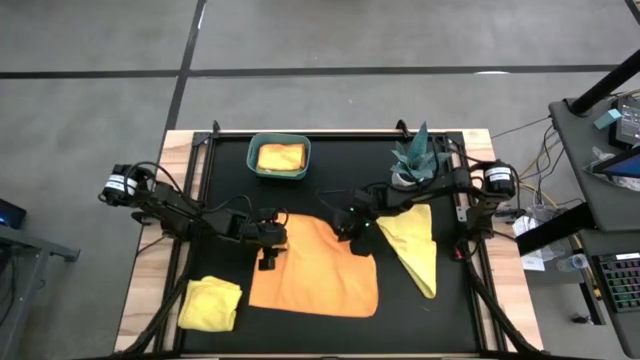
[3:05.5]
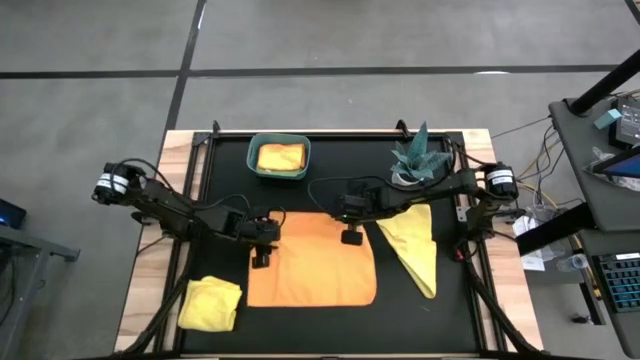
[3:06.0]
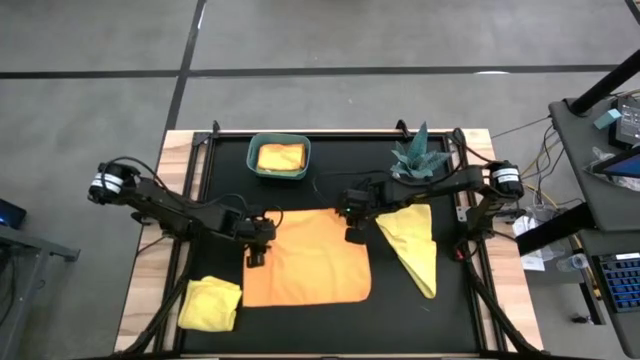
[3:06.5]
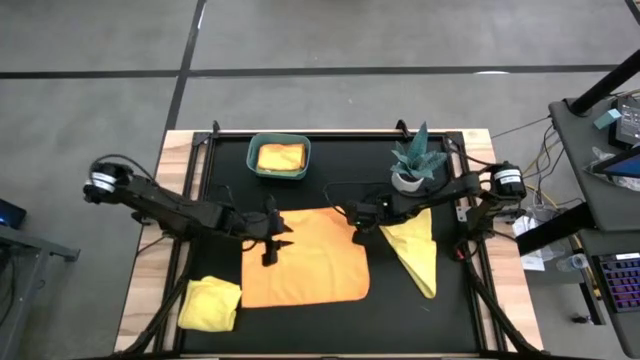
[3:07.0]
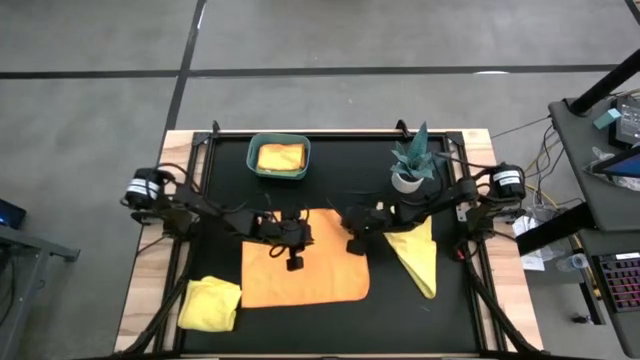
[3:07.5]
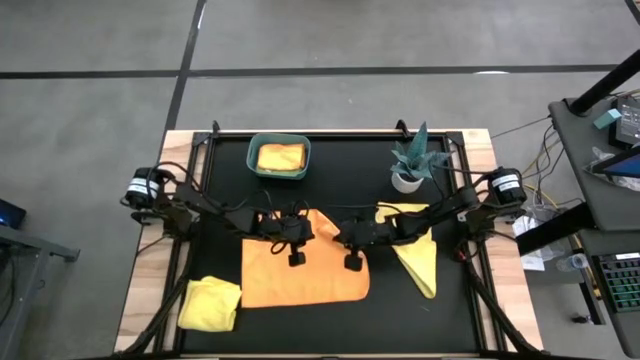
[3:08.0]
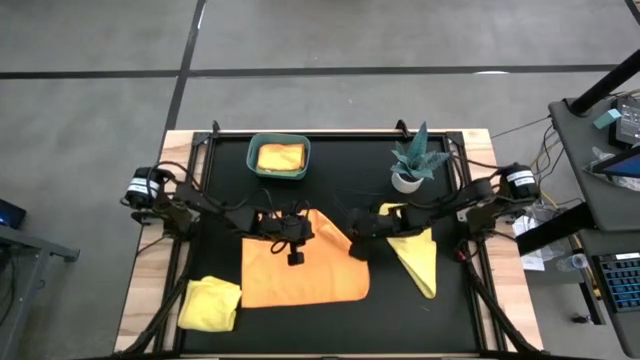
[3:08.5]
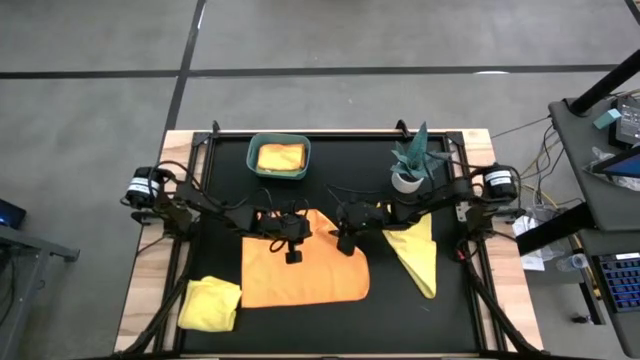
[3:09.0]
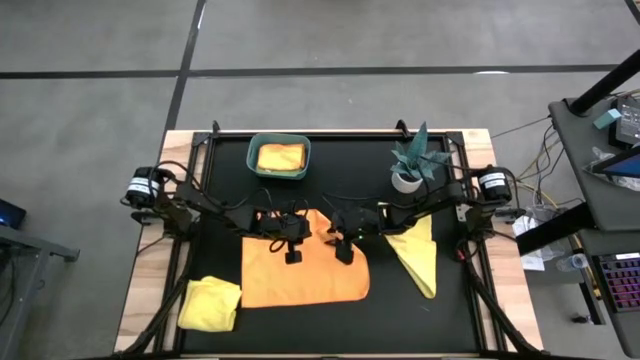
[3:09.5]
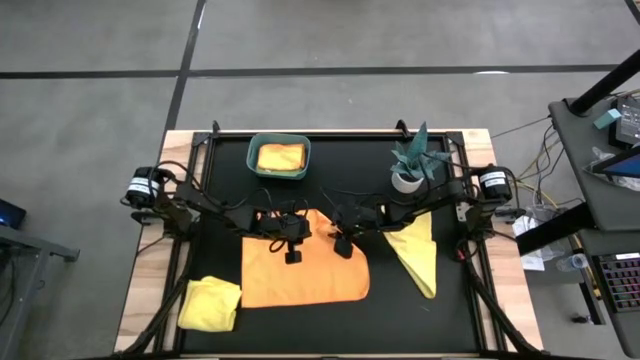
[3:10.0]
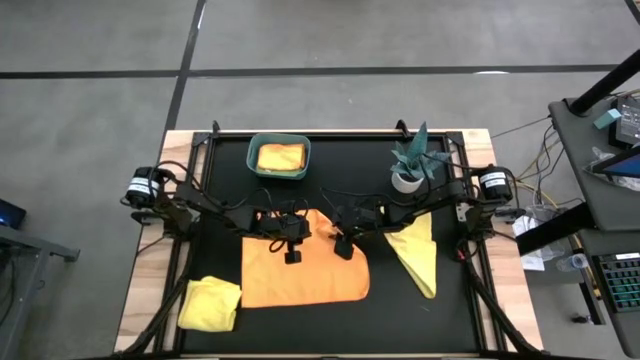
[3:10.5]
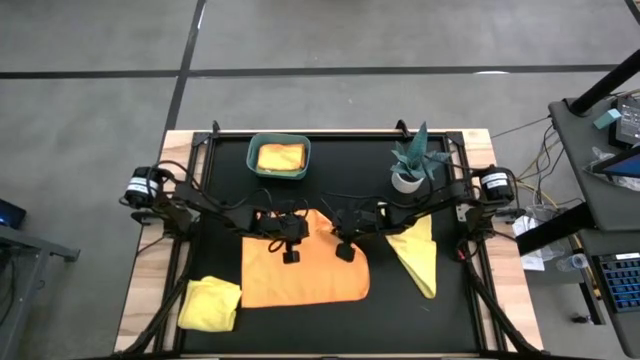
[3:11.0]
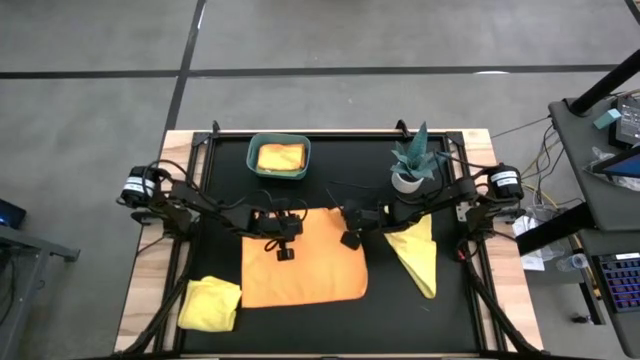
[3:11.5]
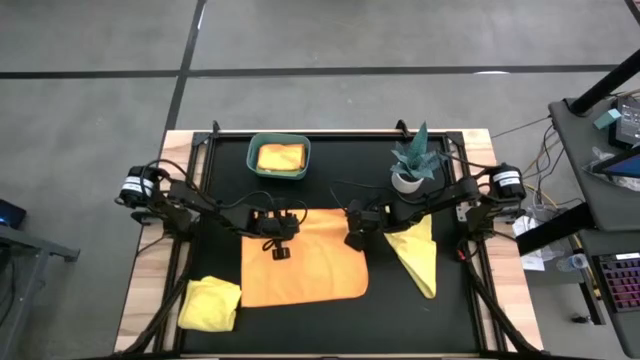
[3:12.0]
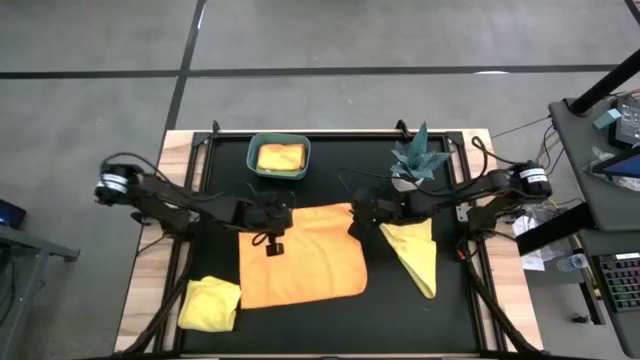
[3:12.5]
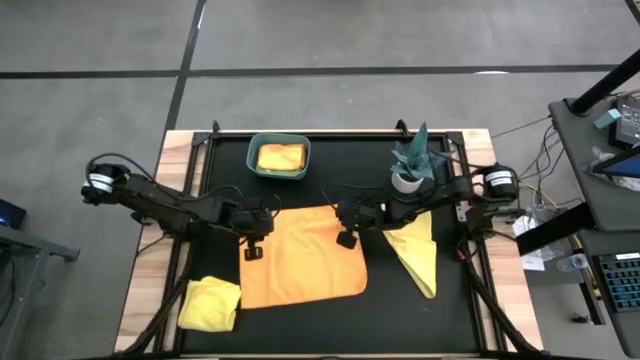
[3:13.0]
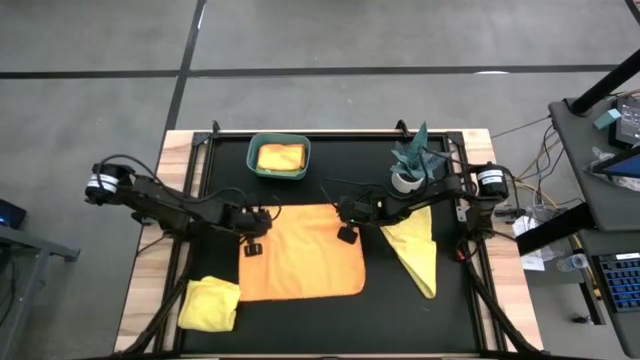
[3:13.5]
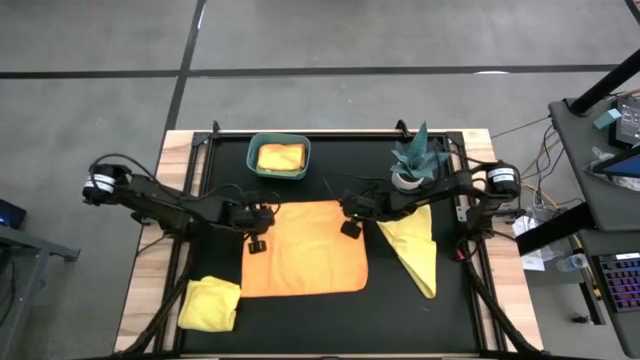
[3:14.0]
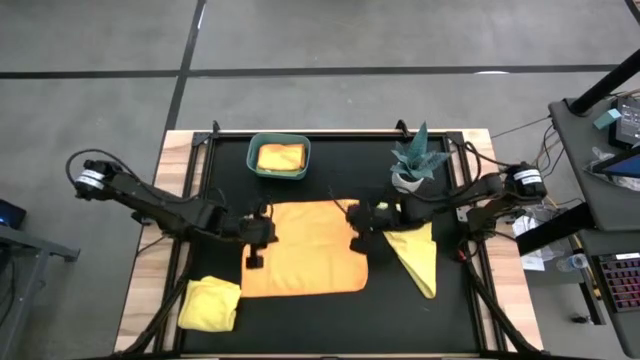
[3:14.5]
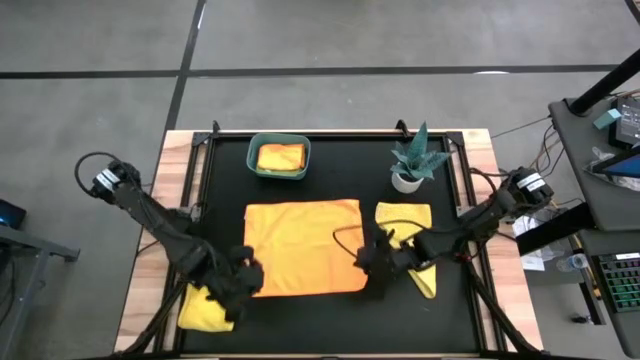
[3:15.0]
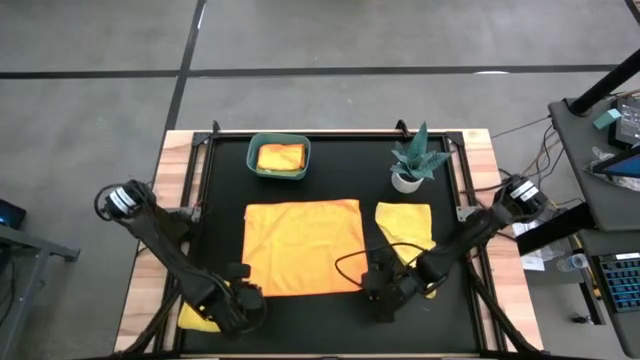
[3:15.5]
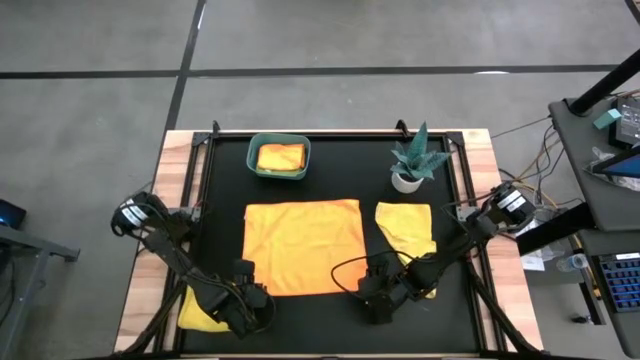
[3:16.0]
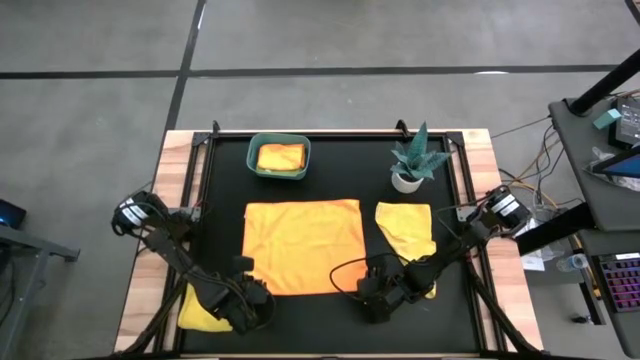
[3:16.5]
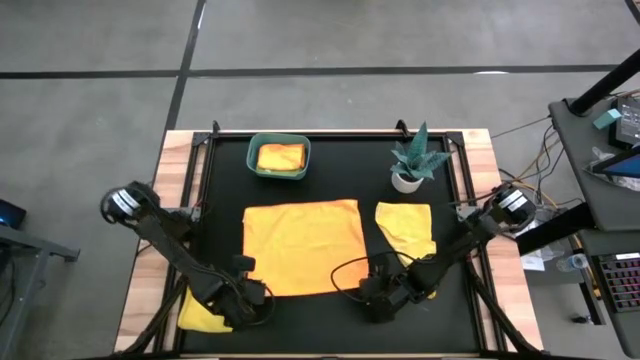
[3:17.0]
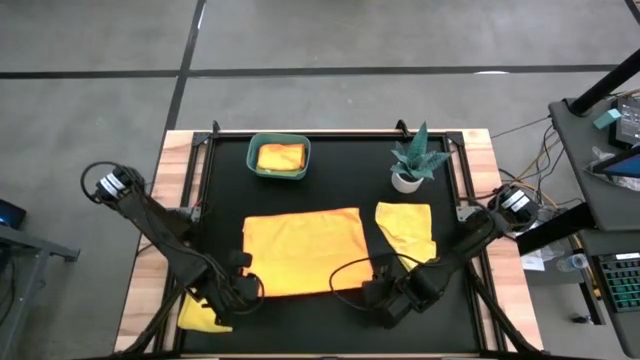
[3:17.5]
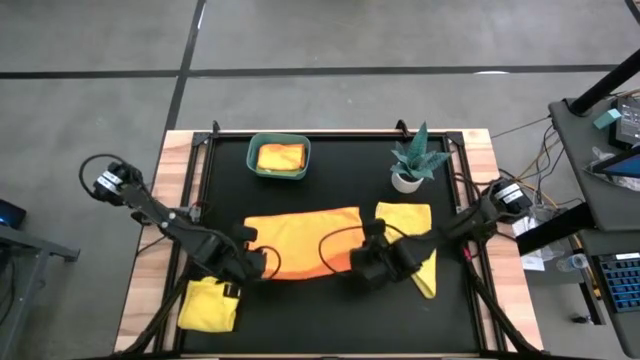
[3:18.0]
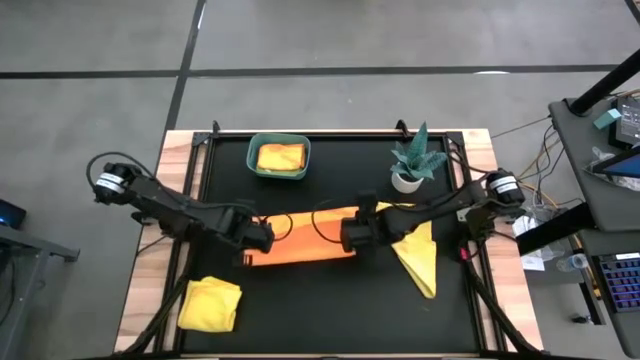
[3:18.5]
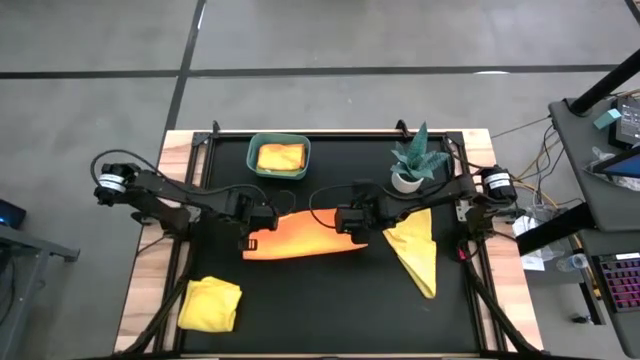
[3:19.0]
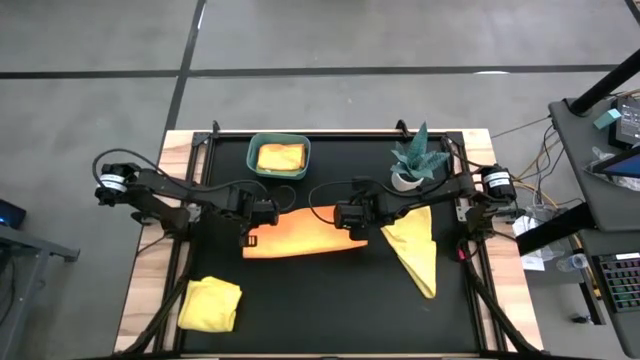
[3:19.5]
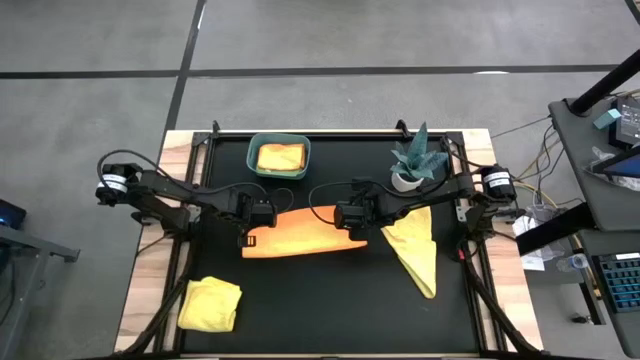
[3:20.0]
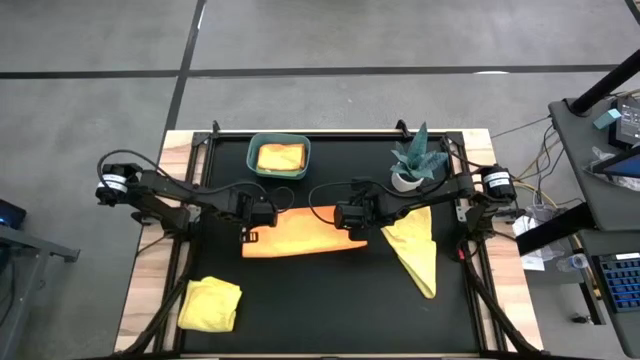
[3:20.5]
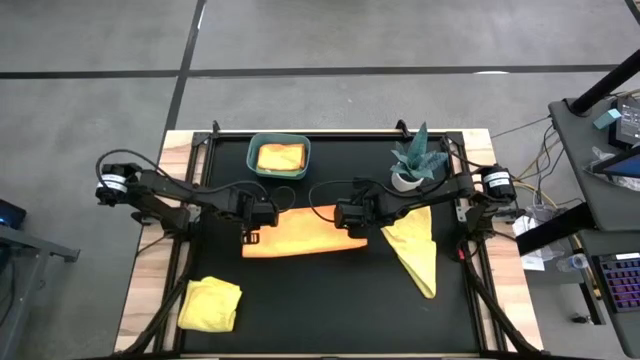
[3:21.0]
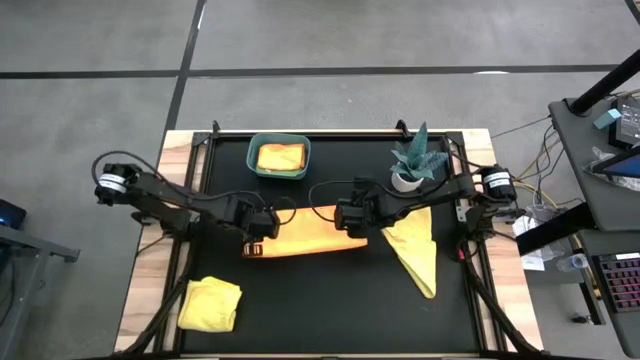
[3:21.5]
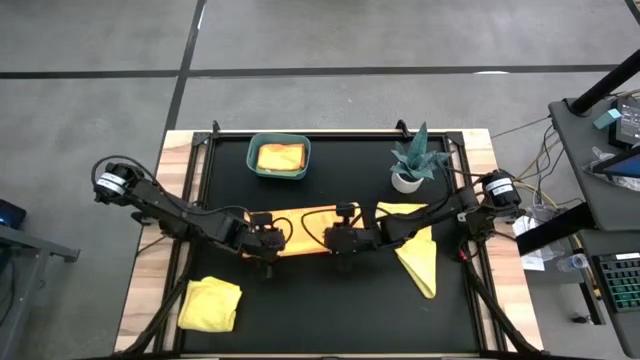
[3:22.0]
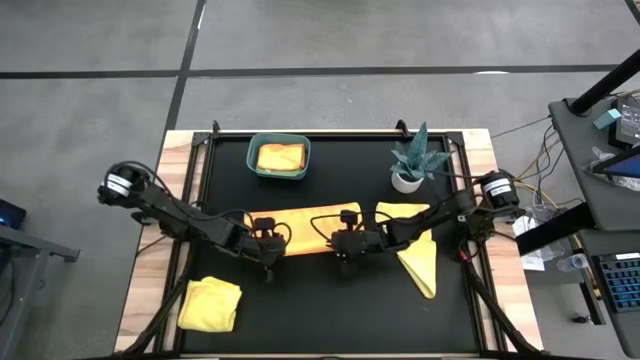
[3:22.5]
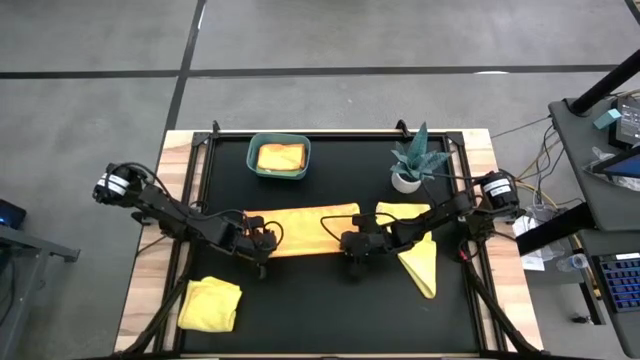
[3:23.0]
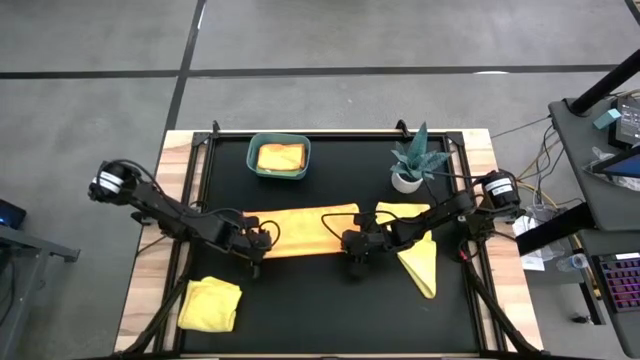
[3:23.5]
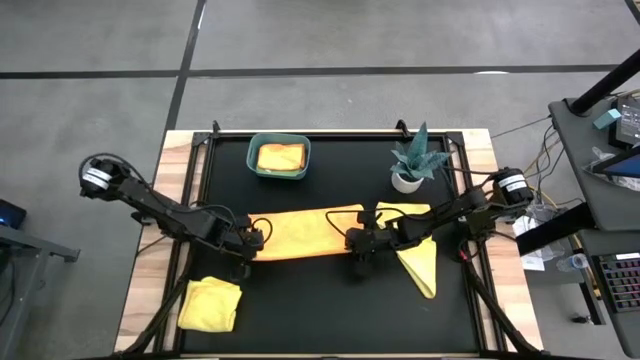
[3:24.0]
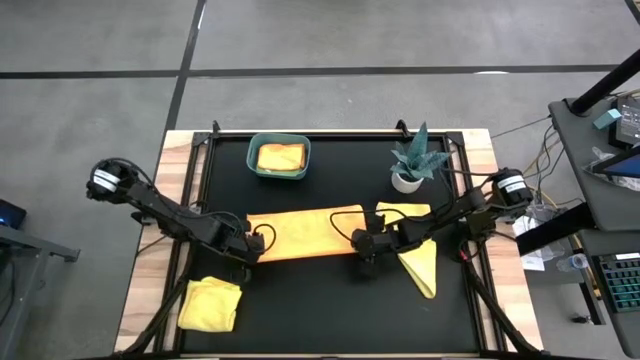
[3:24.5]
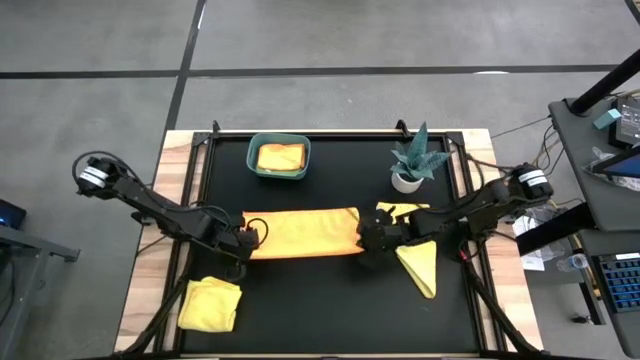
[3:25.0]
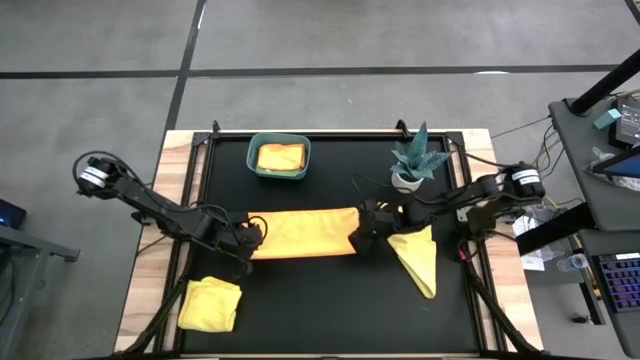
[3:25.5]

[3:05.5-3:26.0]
Task: Fold microfiber towels
Fold the orange microfiber cloth
